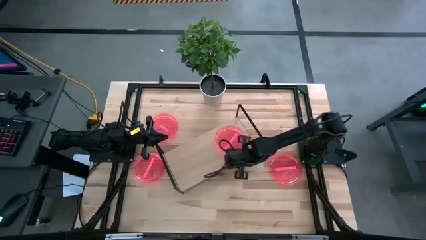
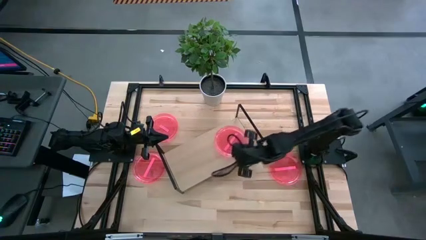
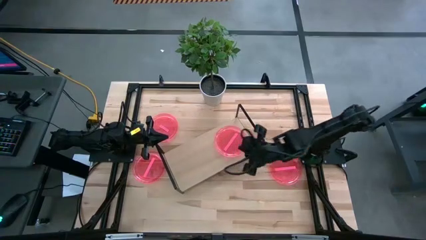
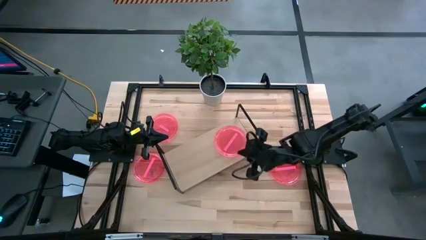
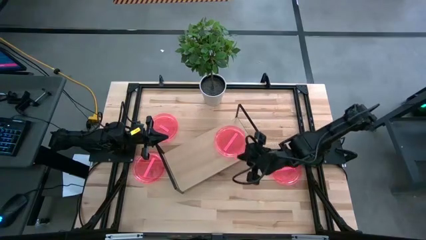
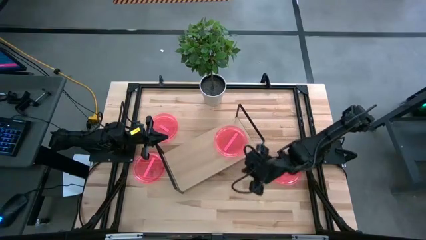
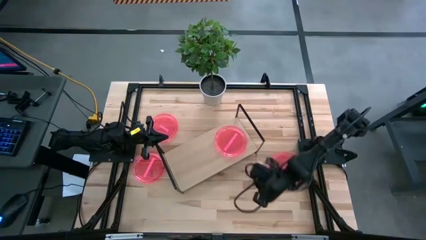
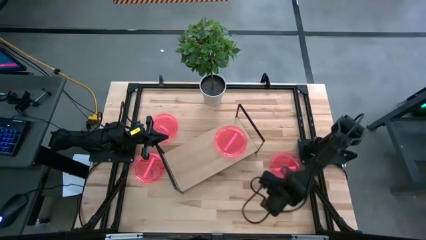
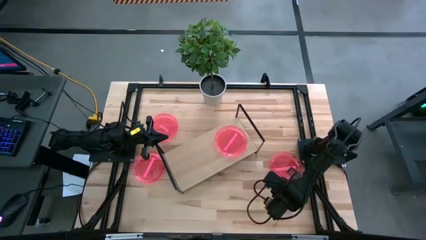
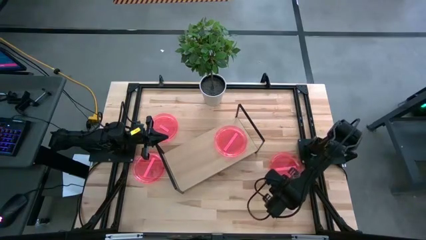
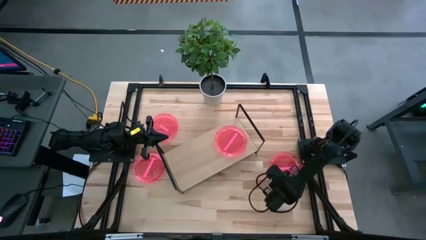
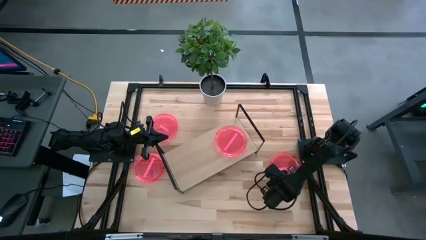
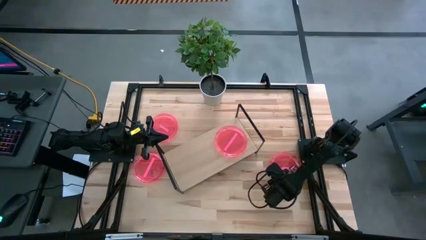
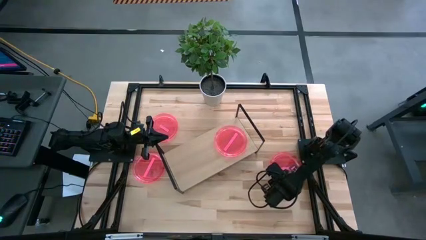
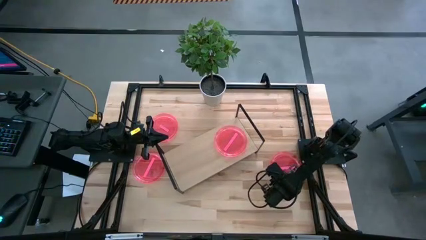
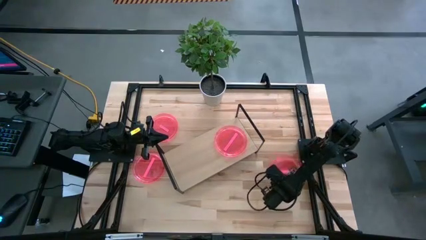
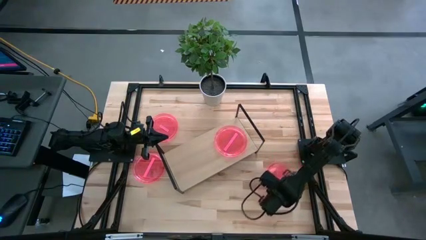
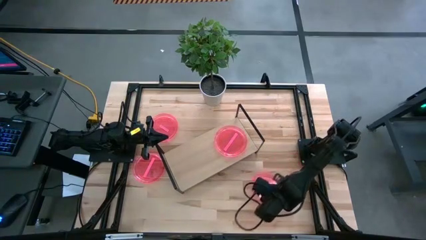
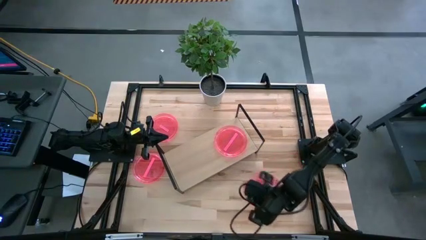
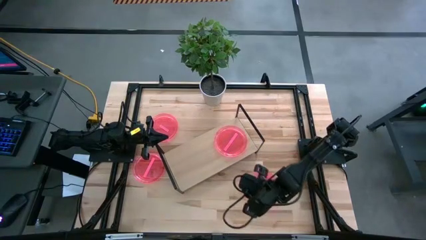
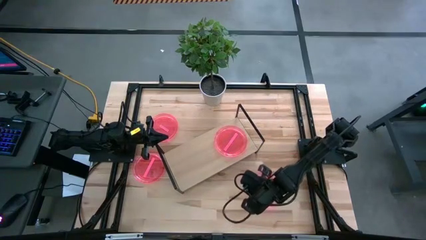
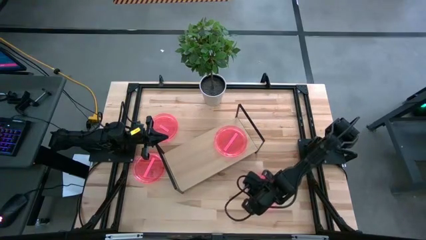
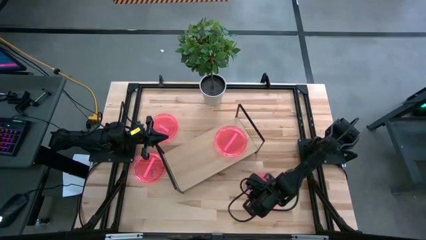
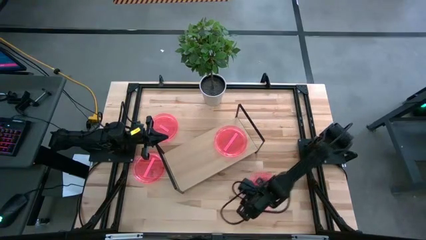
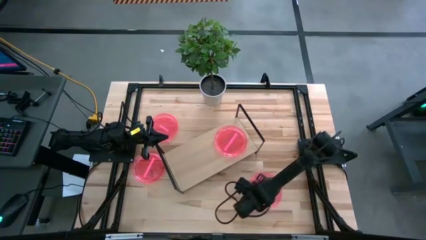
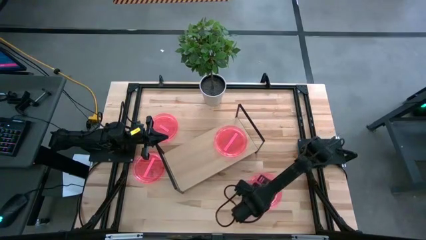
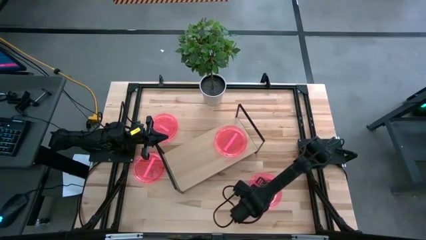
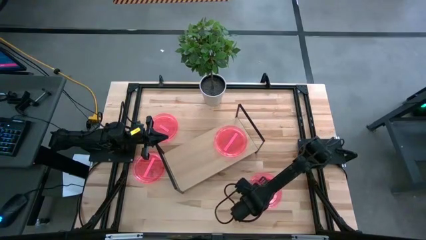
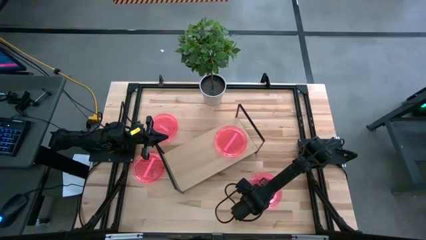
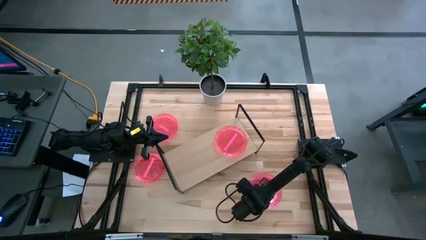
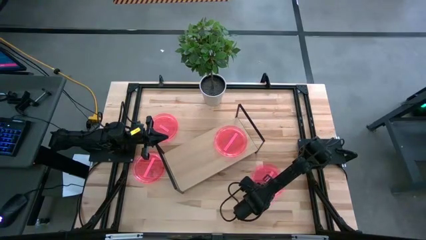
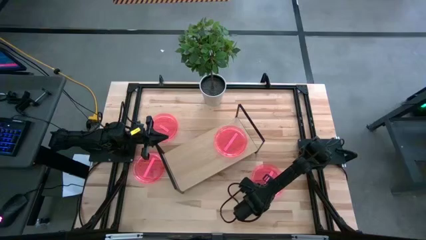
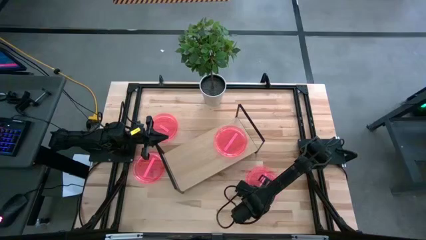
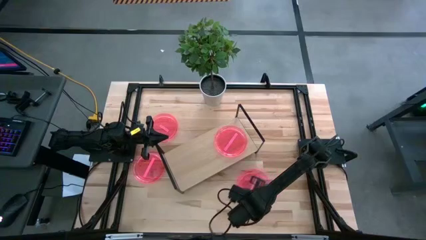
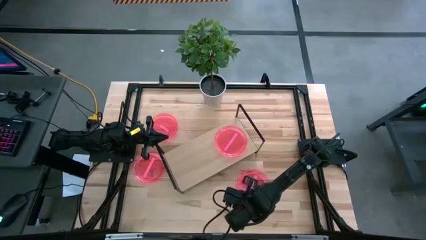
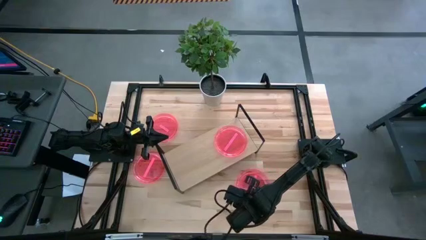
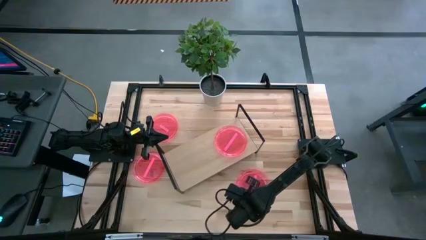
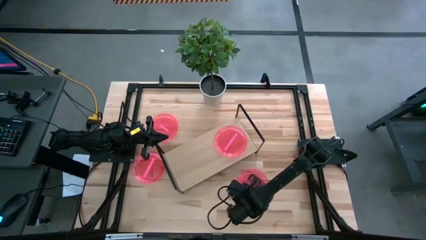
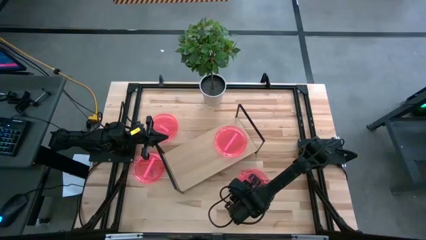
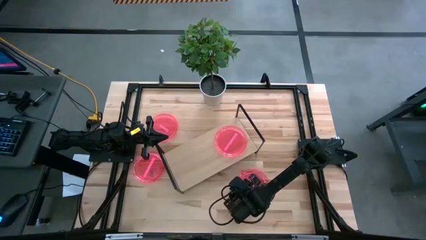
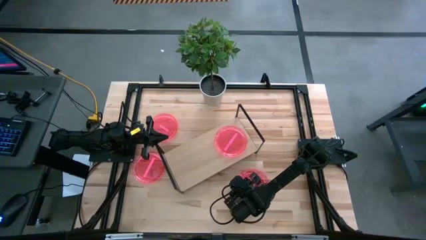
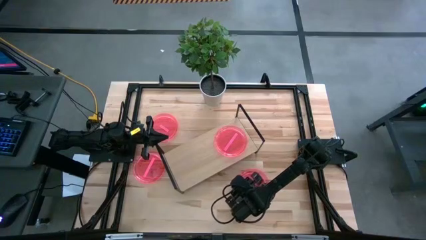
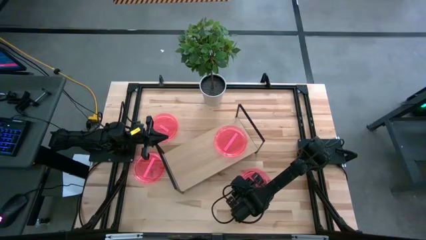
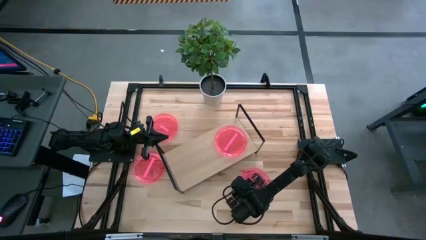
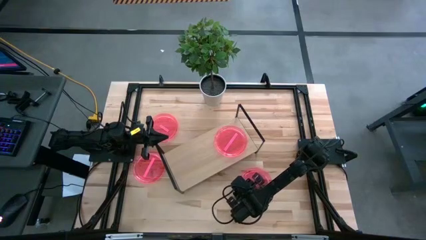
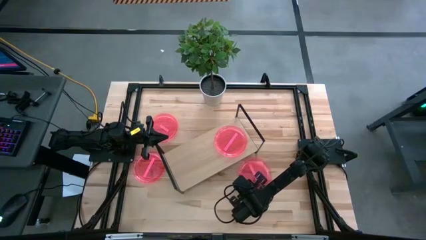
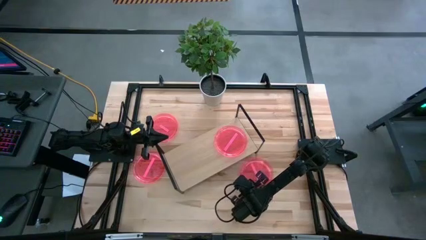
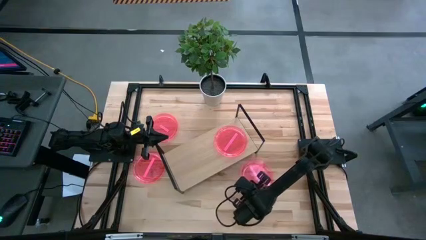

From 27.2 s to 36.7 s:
Task: Place and stack plates onto a shelf
Stack the pink plate on top of the pink plate on the shelf

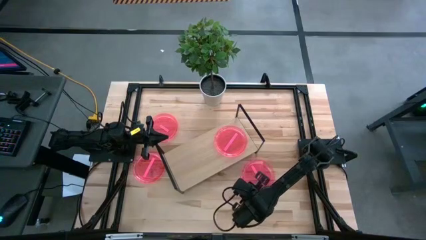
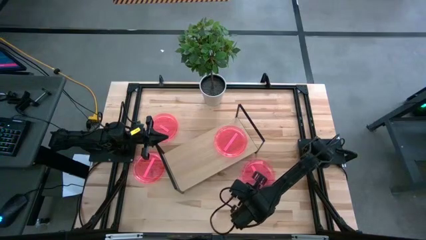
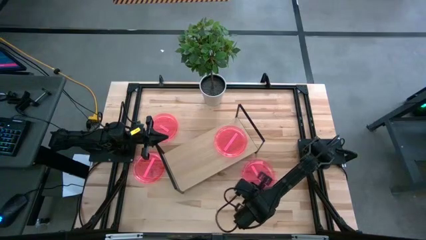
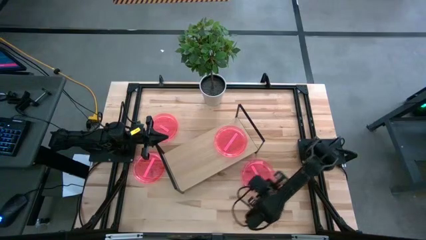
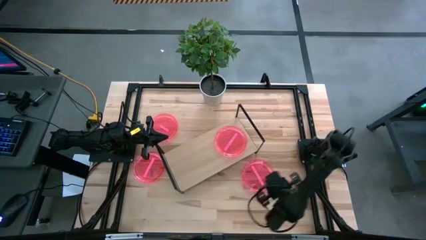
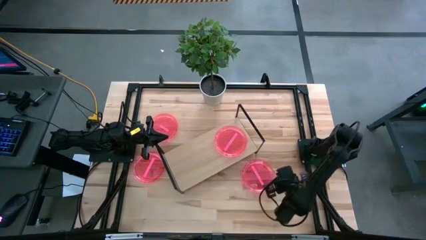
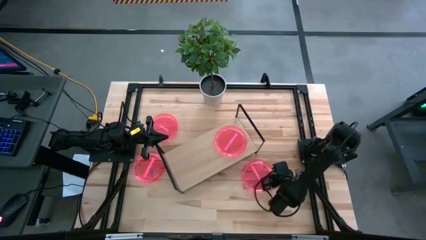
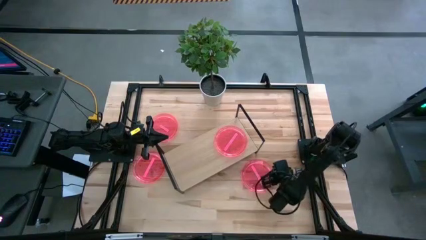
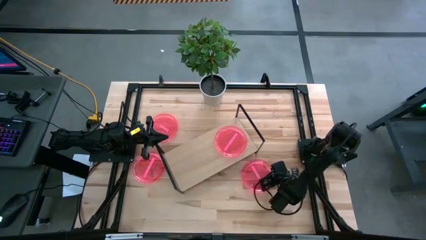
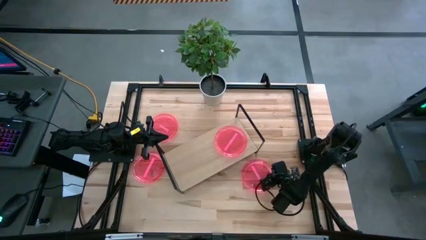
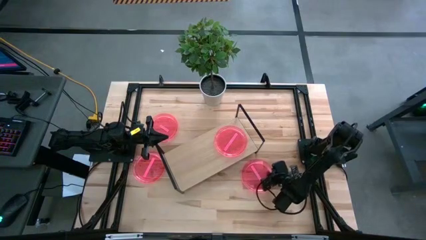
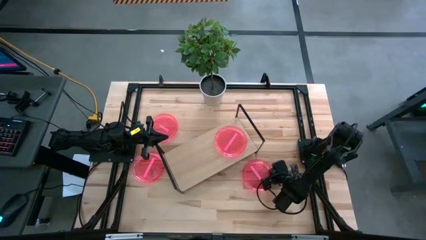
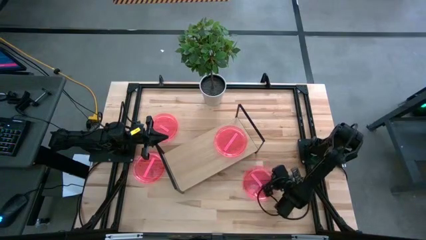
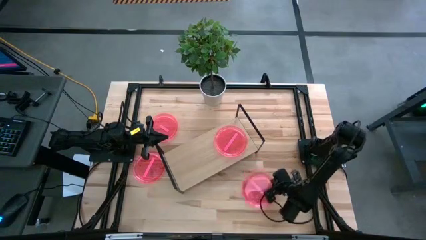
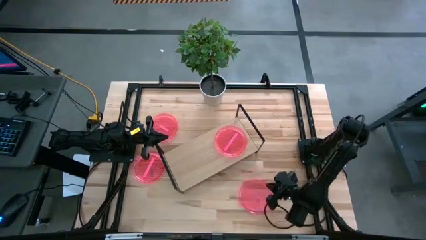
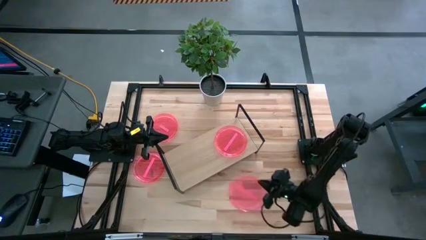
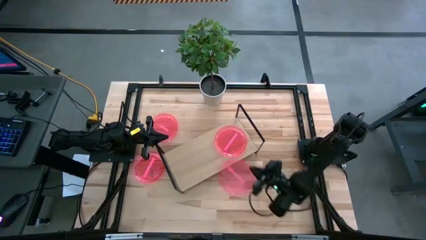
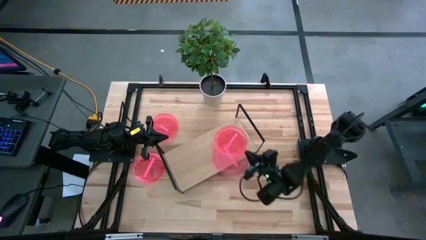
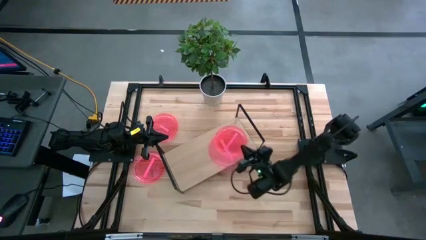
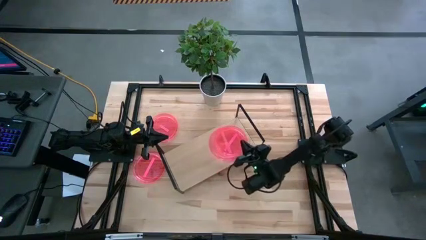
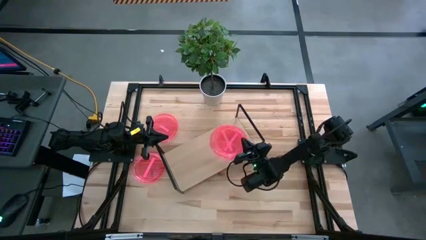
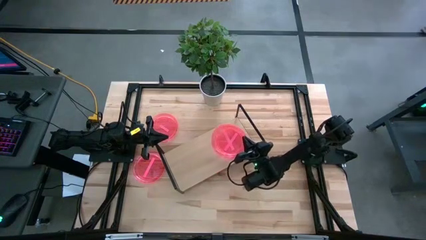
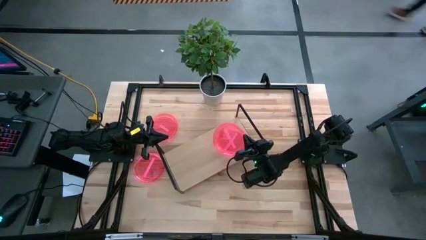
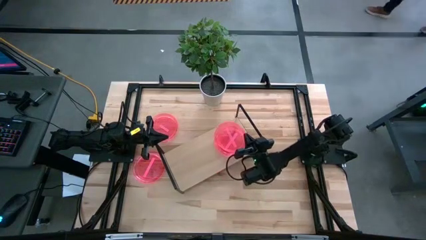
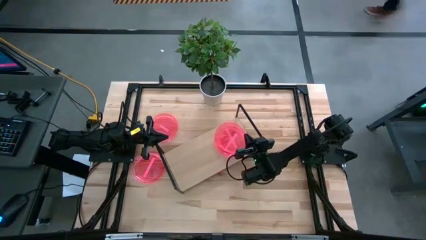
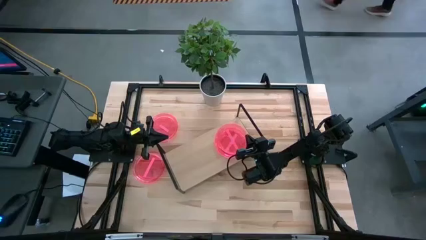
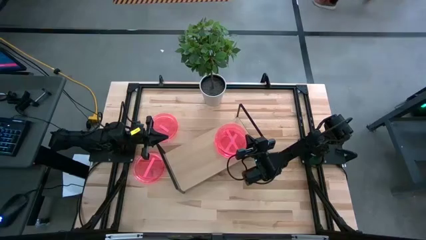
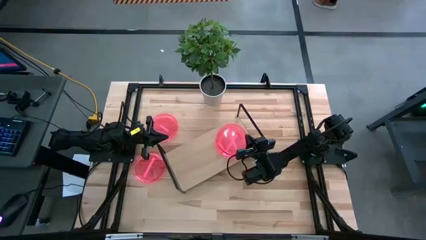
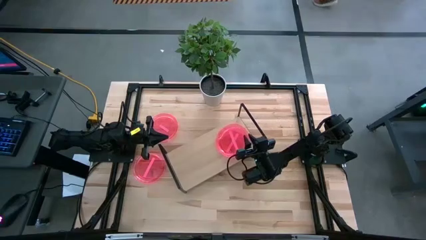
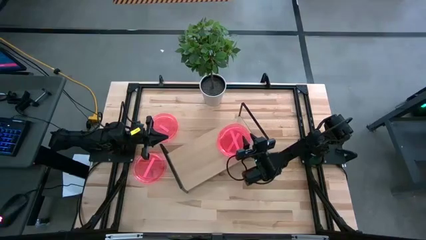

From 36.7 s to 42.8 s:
Stack the pink plate on top of the pink plate on the shelf
